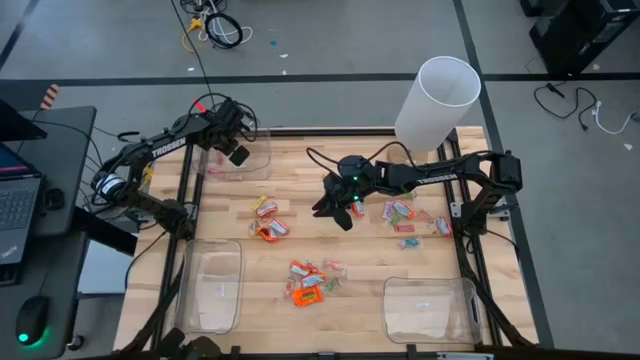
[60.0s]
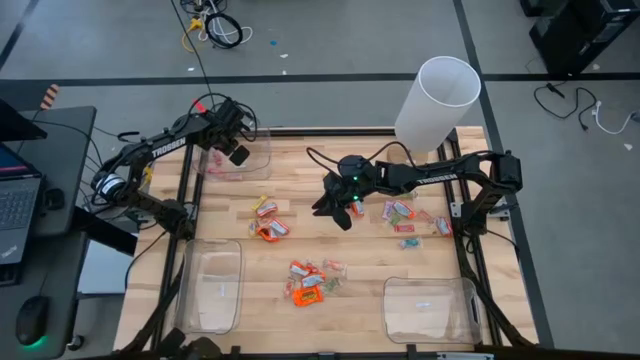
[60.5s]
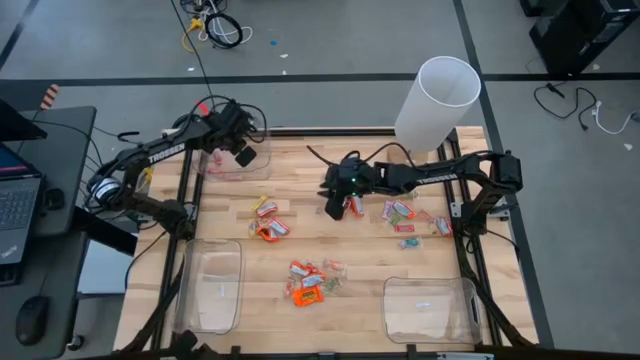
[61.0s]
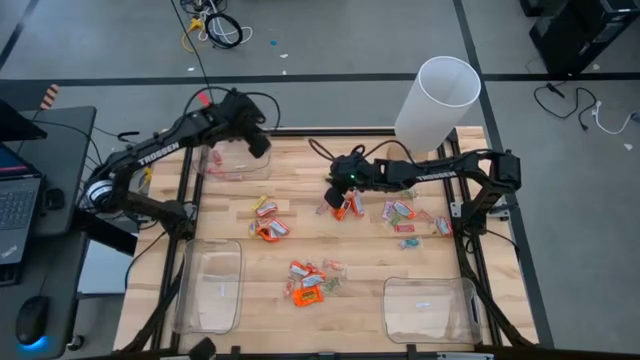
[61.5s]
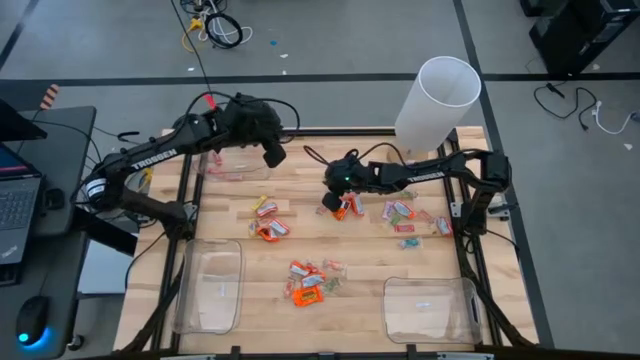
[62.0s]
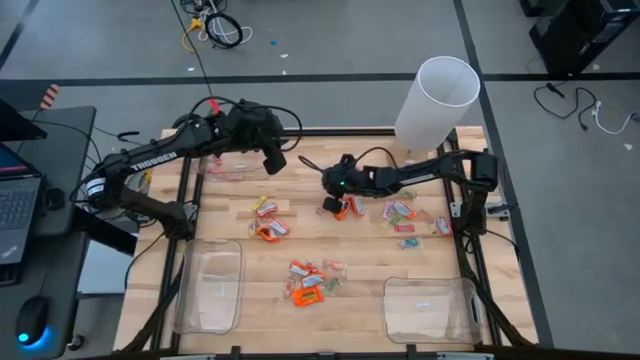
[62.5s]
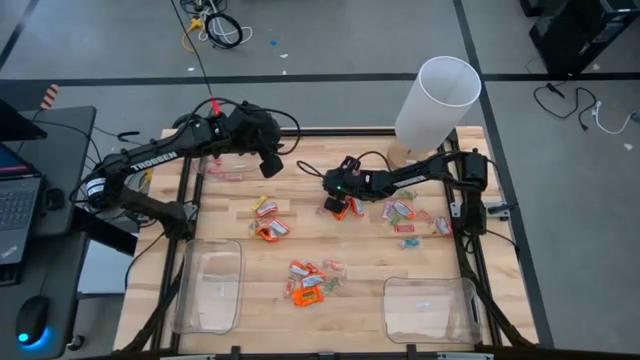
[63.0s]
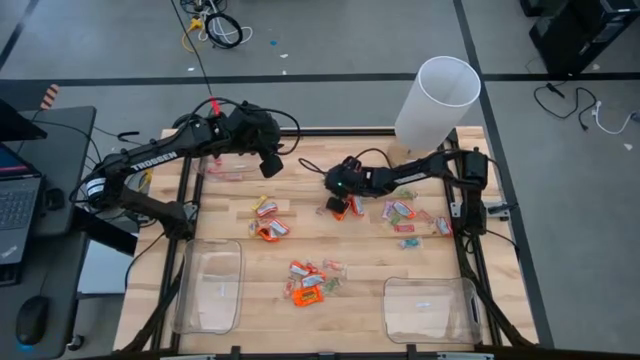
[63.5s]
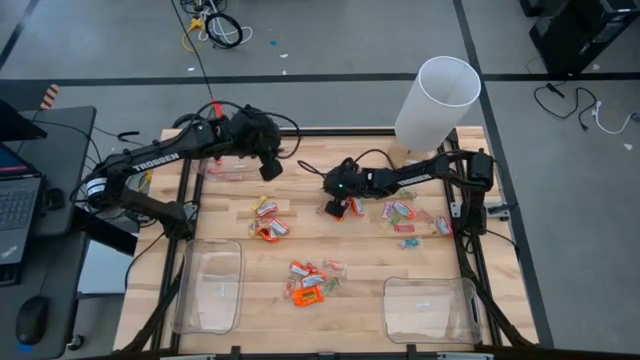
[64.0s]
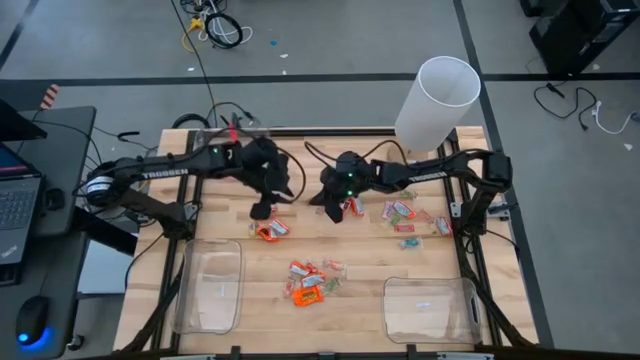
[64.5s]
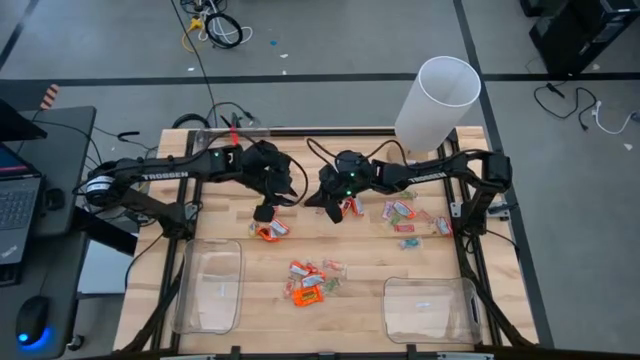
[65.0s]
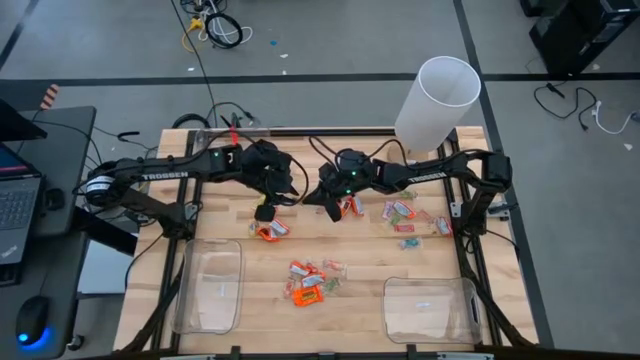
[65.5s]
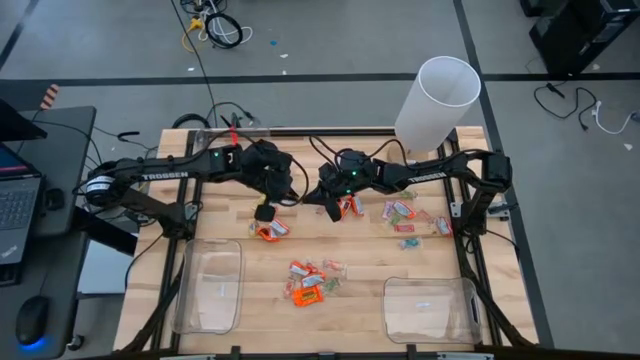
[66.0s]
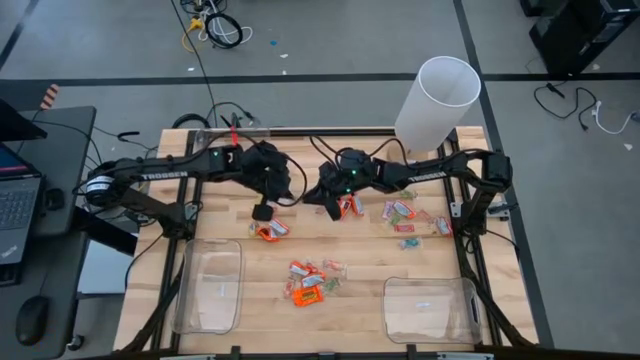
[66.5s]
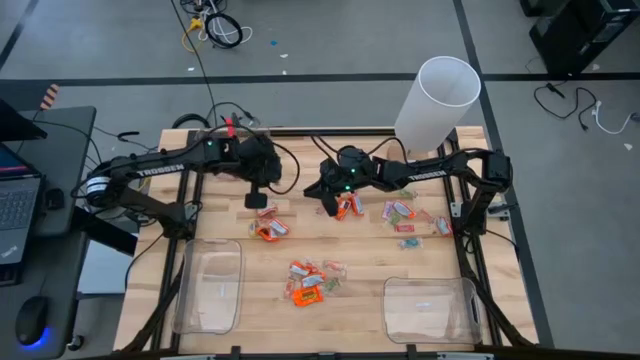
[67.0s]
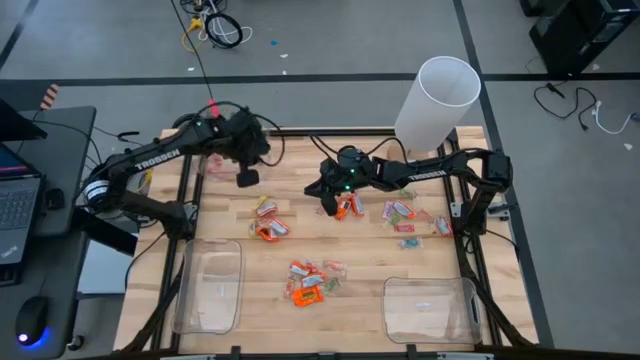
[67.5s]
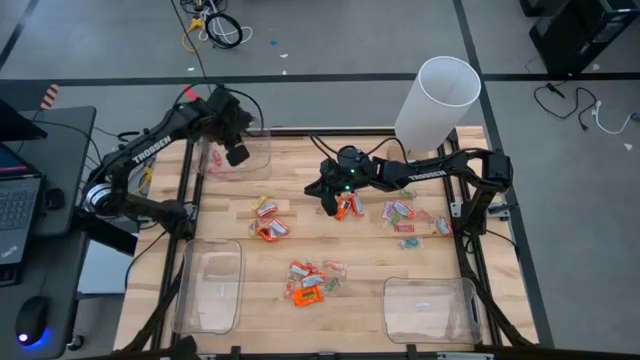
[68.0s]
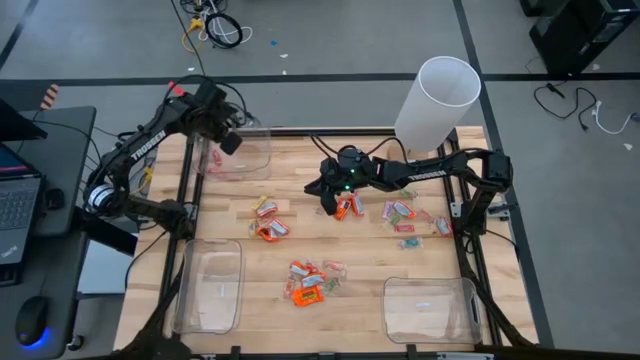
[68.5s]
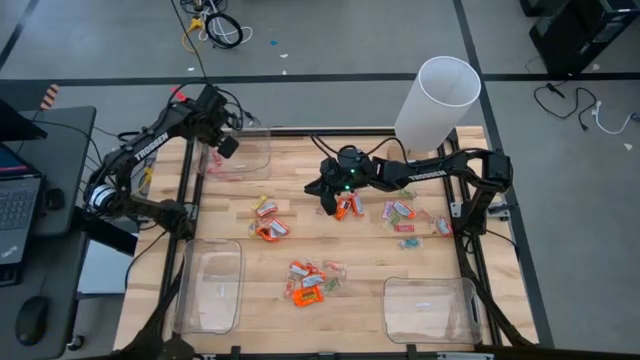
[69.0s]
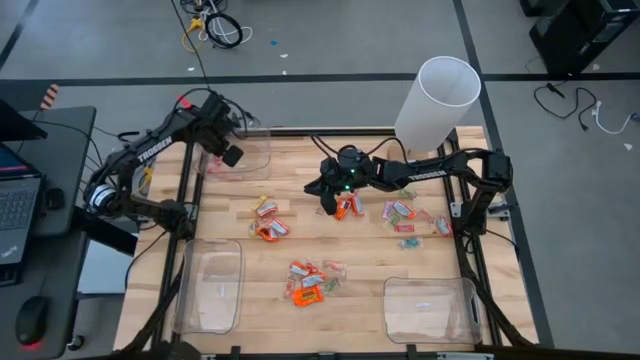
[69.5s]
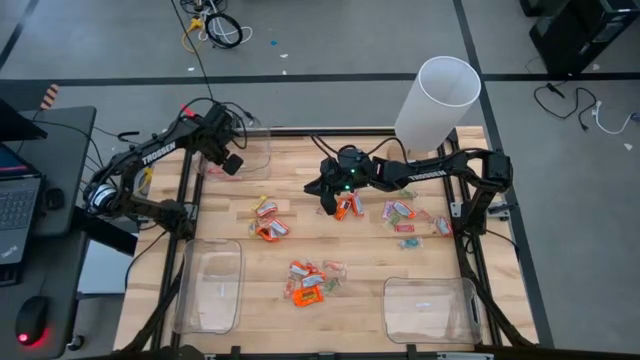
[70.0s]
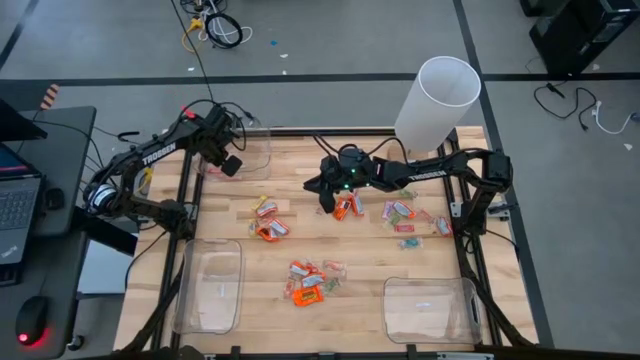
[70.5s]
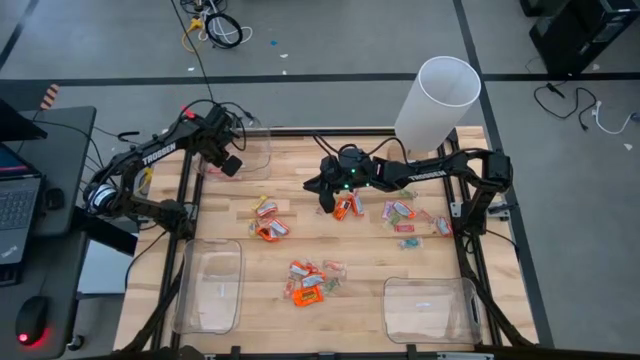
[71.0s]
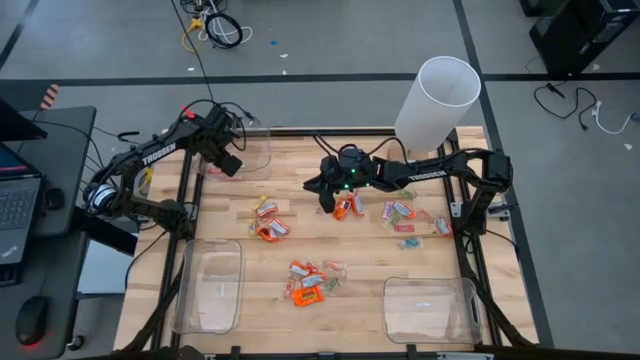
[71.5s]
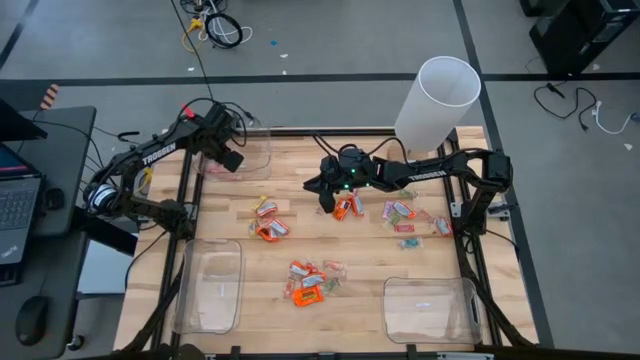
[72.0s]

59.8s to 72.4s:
Task: Sort candy
Put the yellow candy into the top left transparent bin

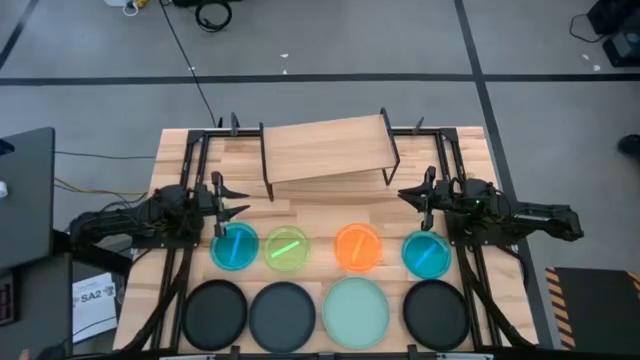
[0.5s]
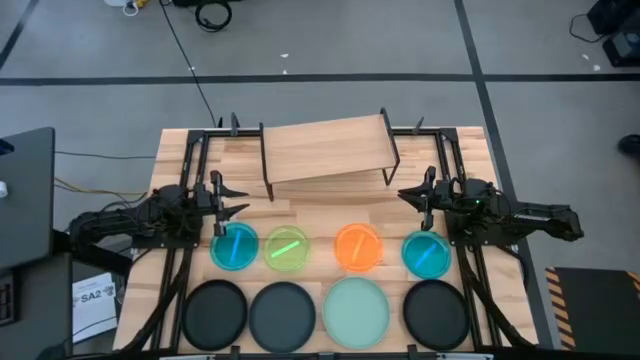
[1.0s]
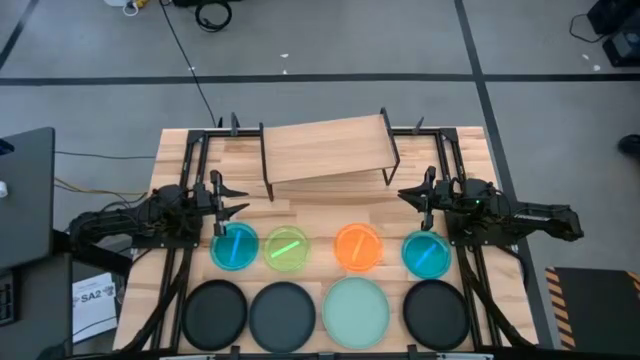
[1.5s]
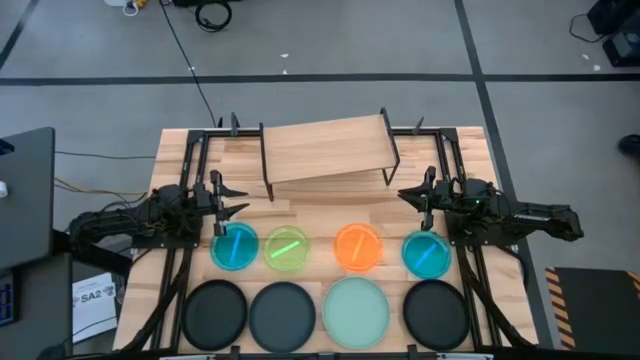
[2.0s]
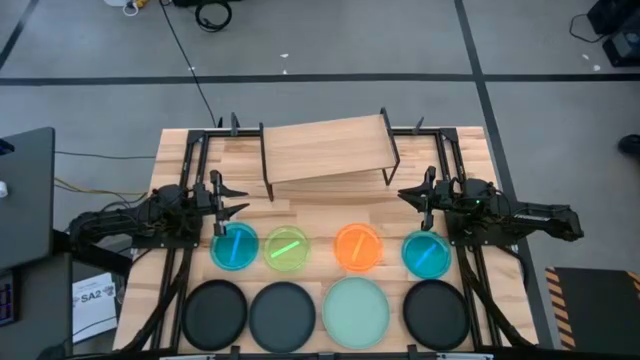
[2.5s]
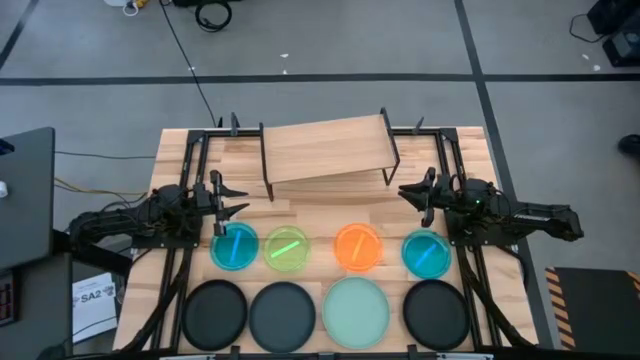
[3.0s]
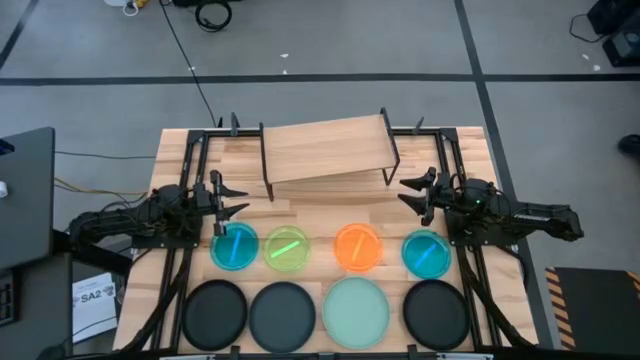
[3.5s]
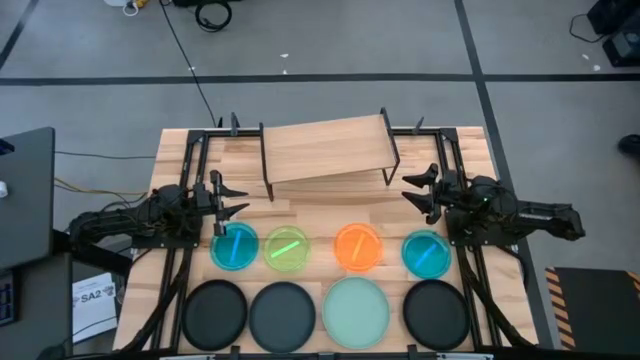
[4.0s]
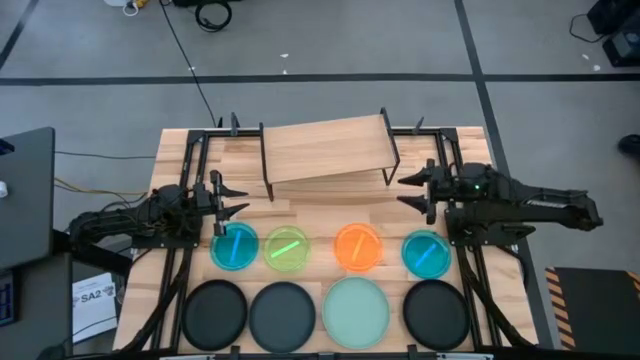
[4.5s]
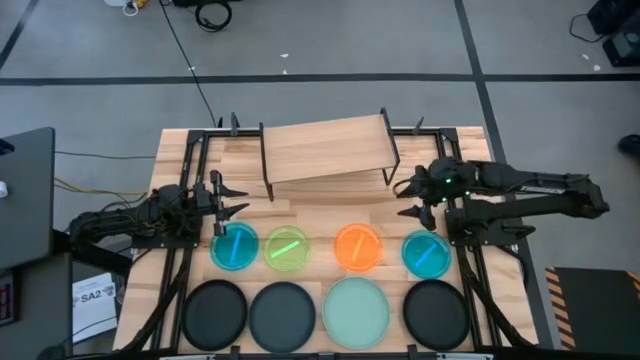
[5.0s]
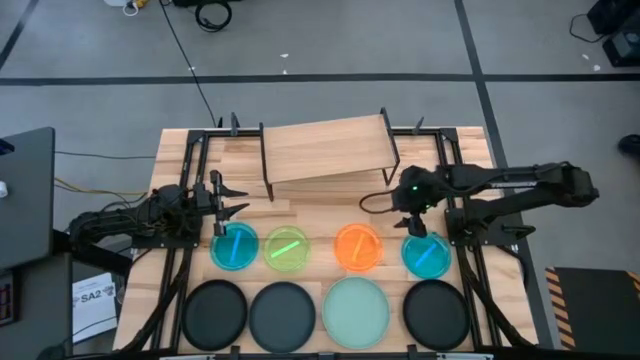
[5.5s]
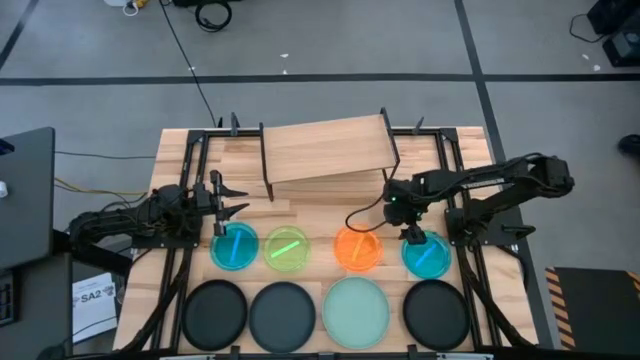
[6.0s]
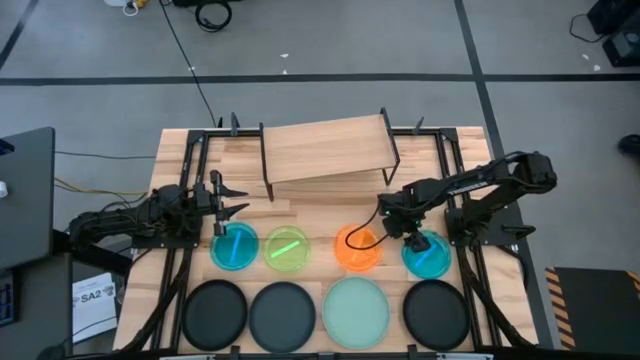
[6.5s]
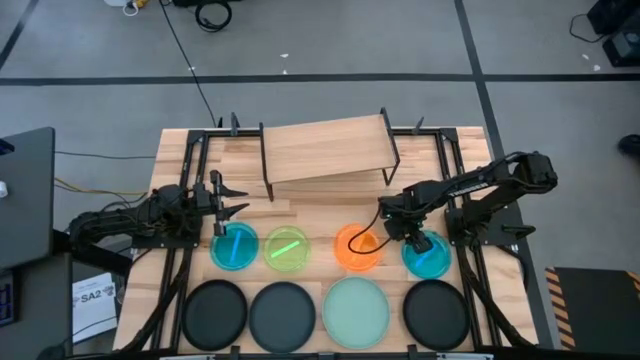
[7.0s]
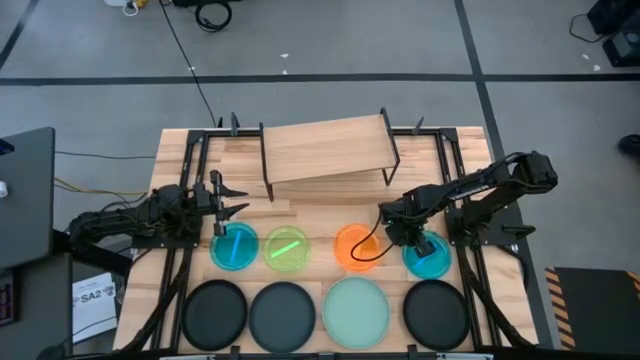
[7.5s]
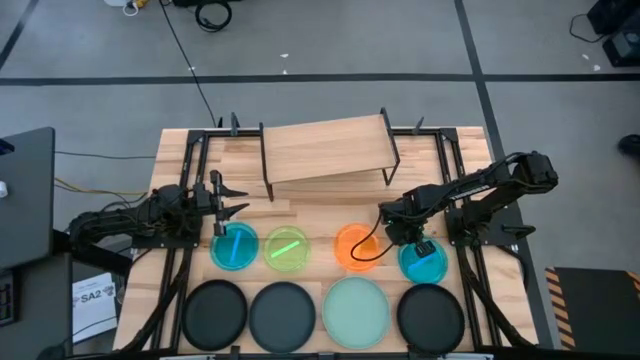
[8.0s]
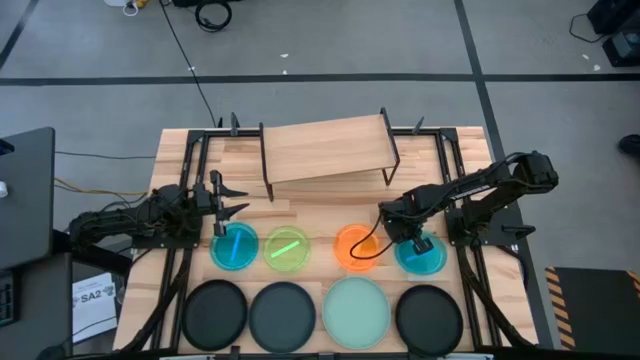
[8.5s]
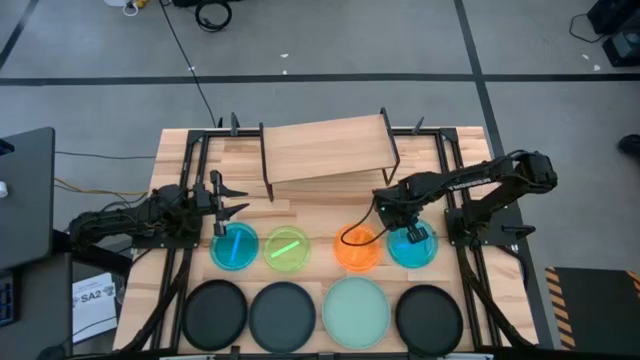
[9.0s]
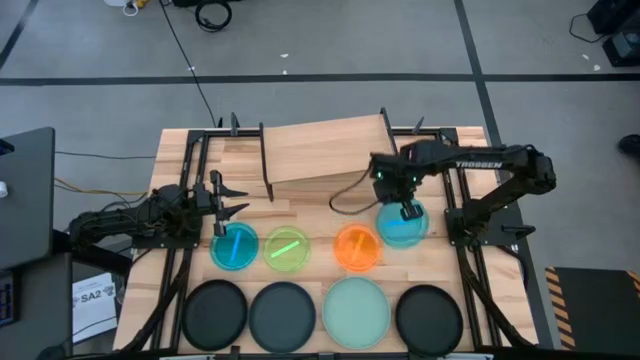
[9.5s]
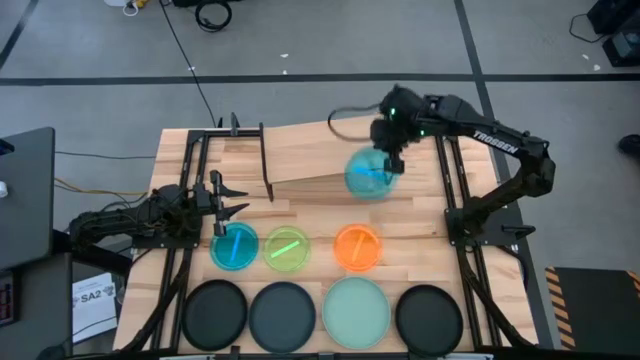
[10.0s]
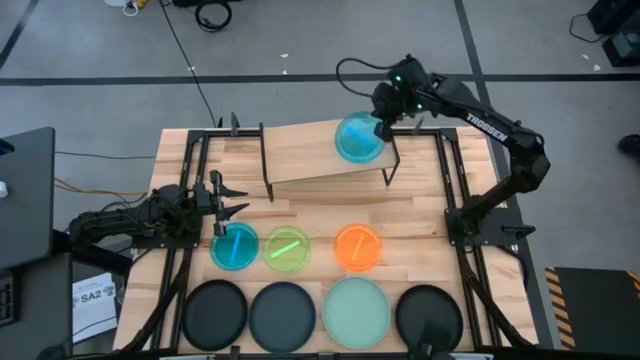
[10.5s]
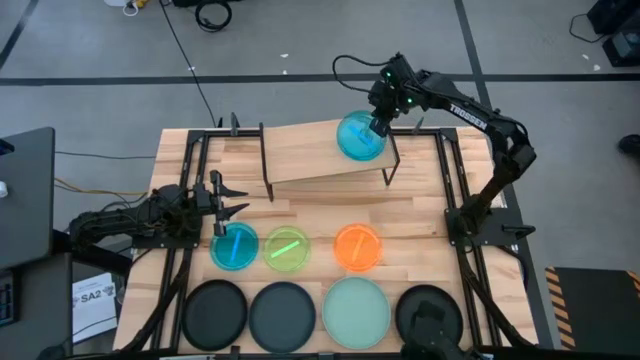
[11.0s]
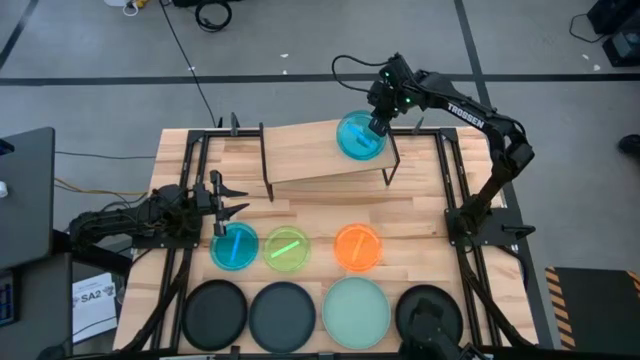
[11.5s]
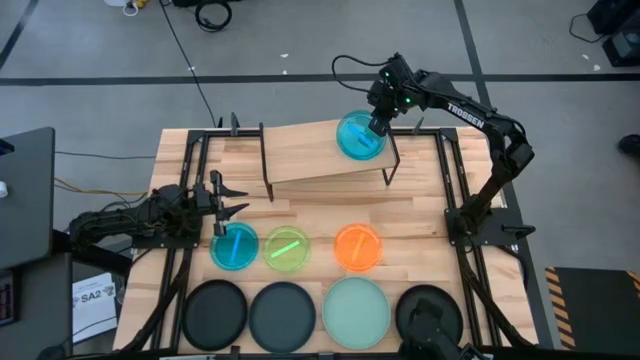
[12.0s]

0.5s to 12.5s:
Task: Place and stack plates onto a shelf
Put the right light blue plate on the shelf
